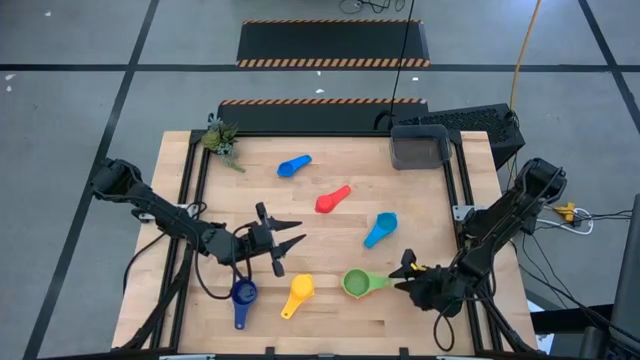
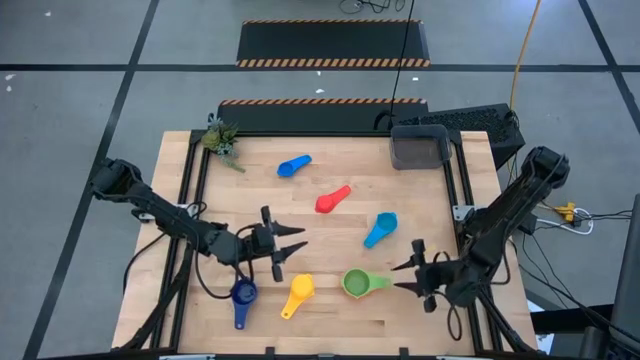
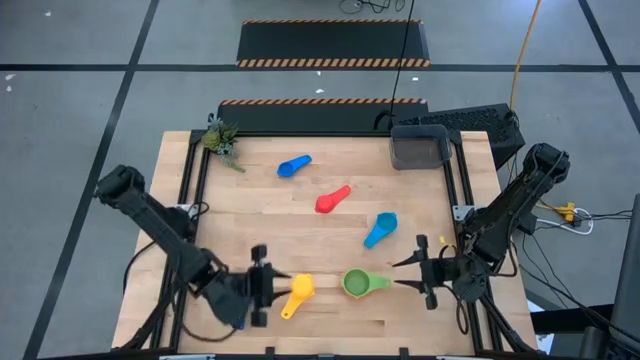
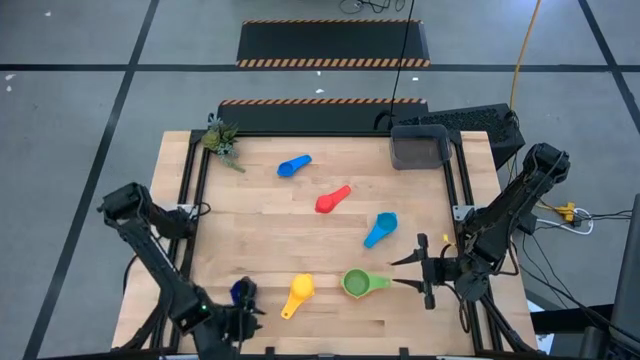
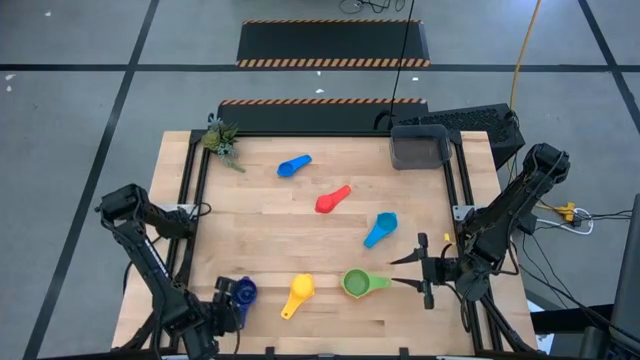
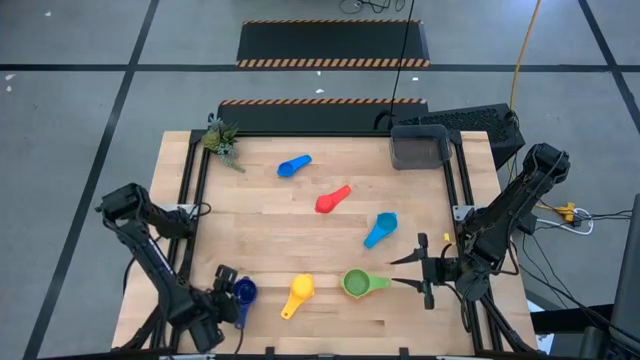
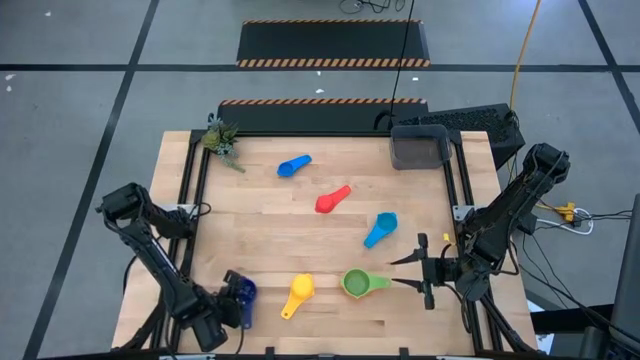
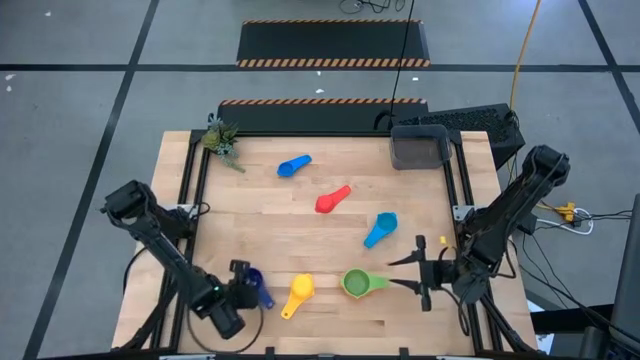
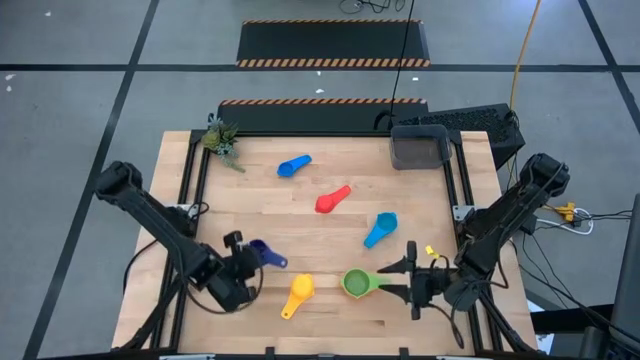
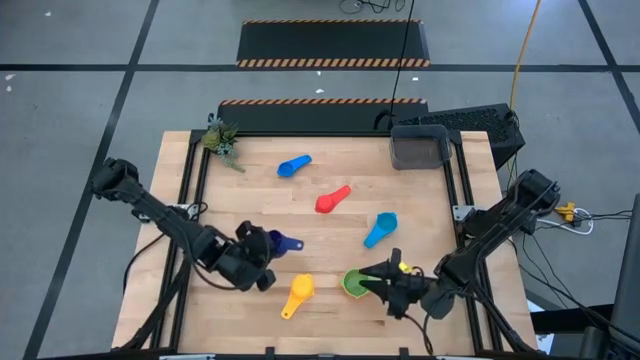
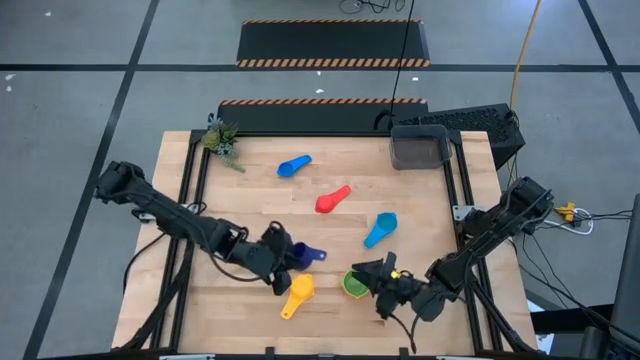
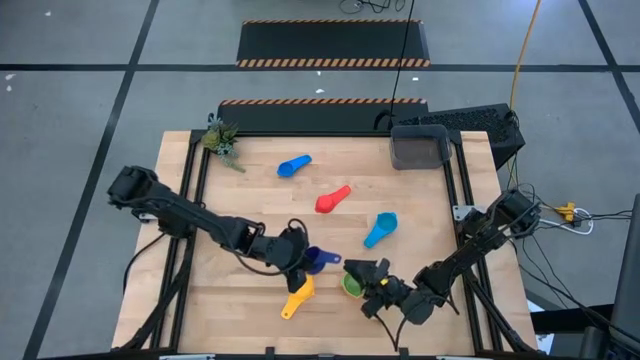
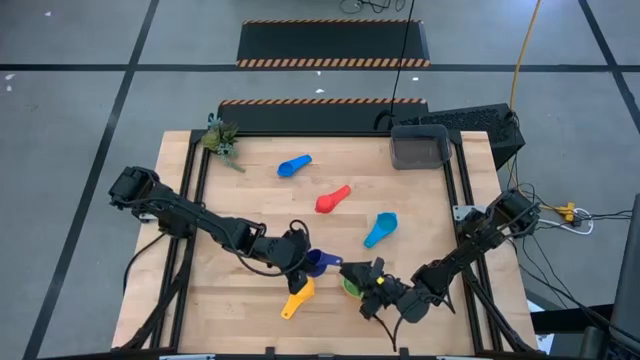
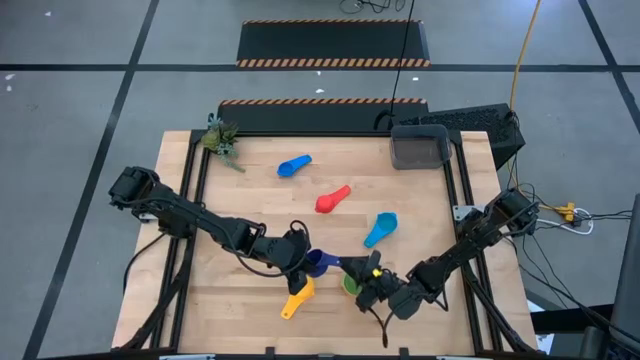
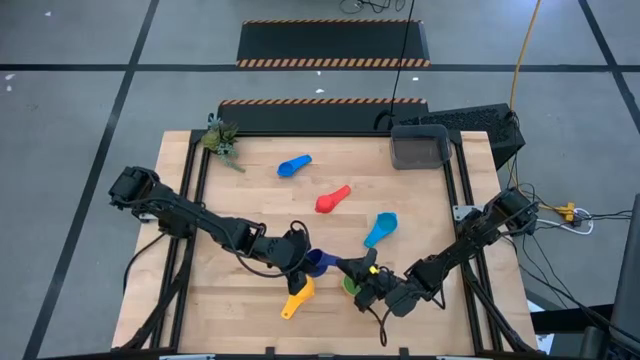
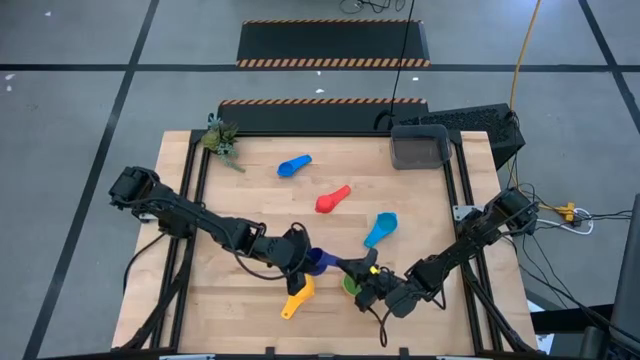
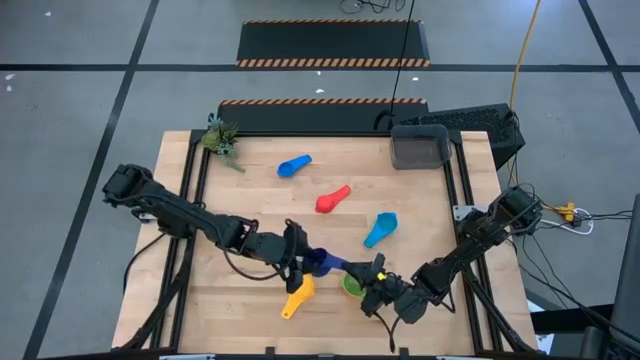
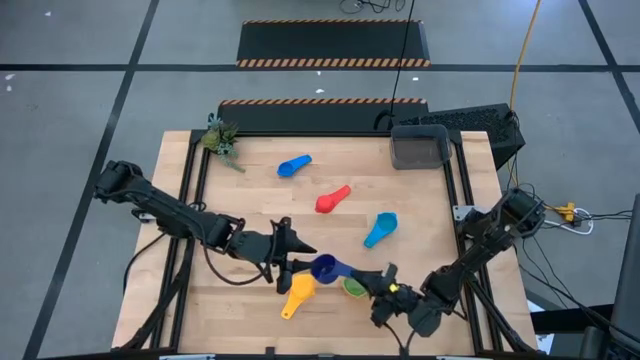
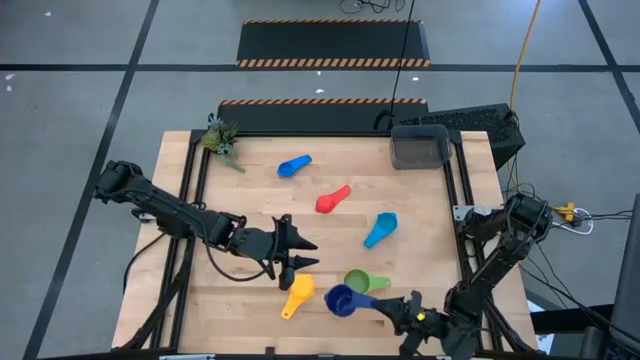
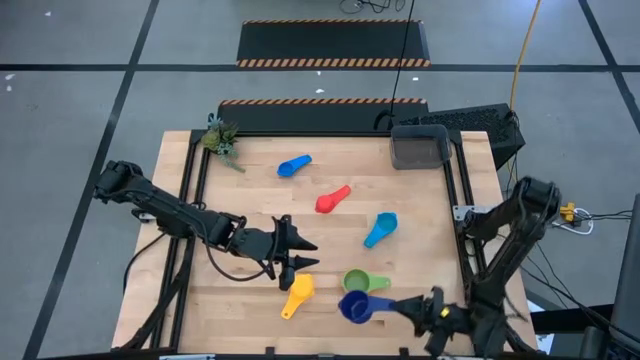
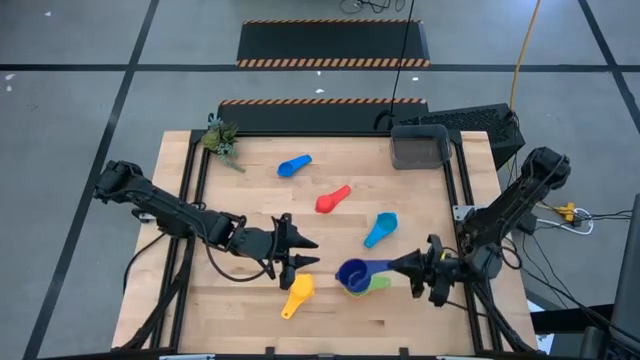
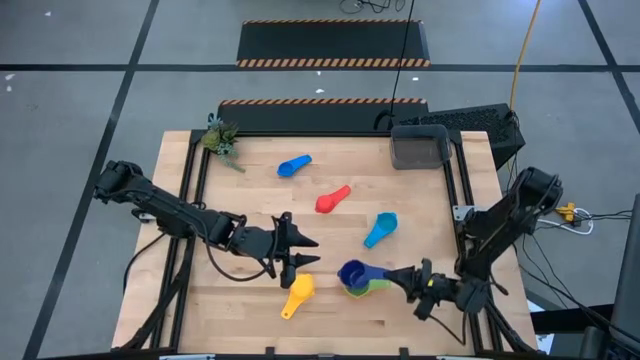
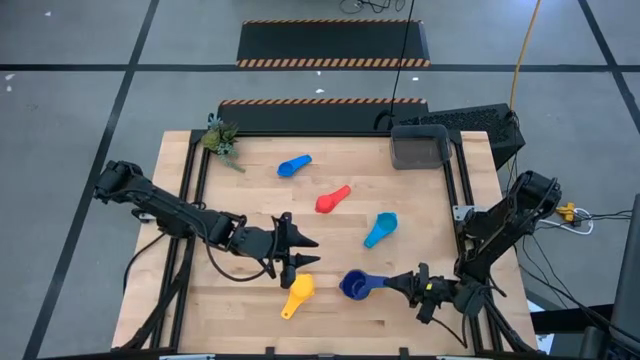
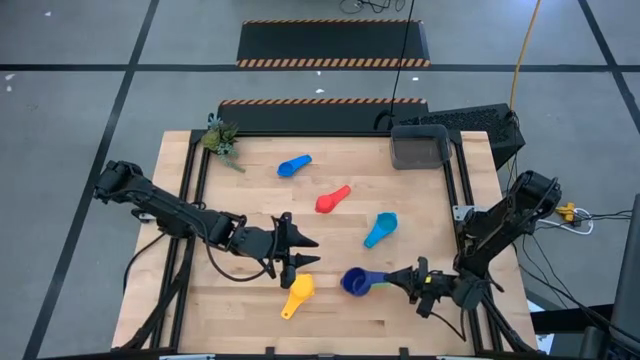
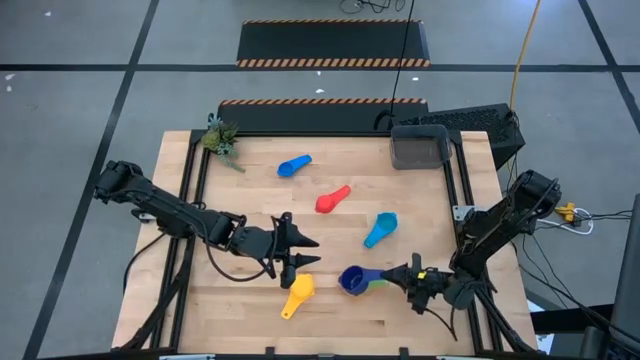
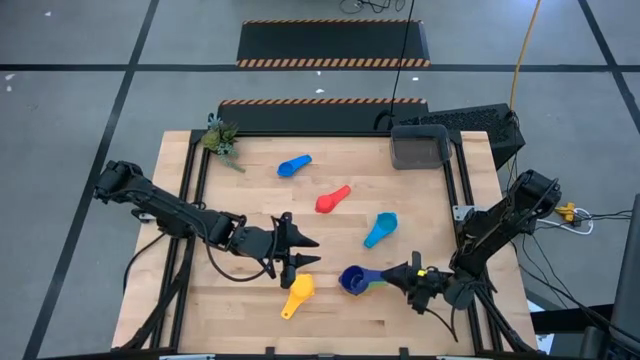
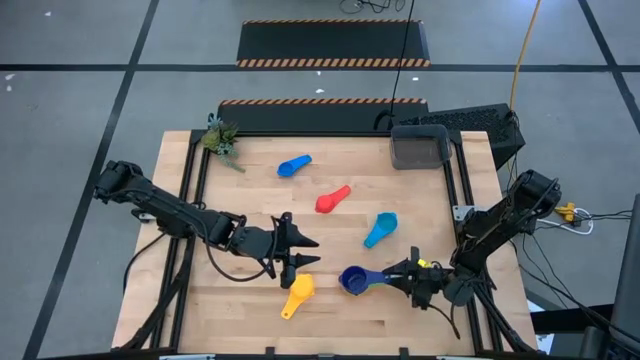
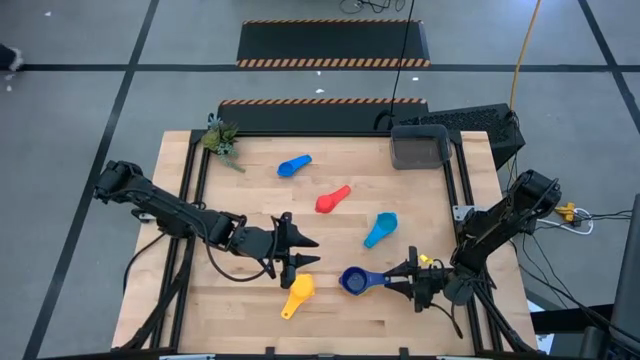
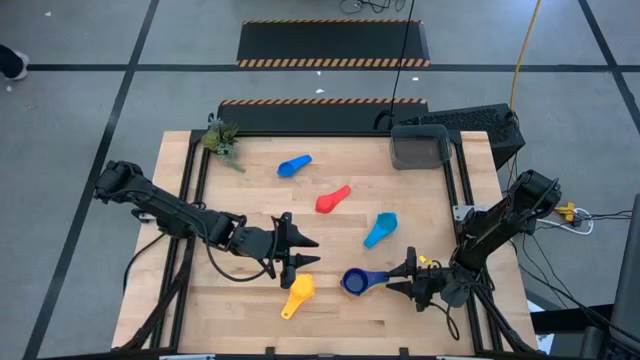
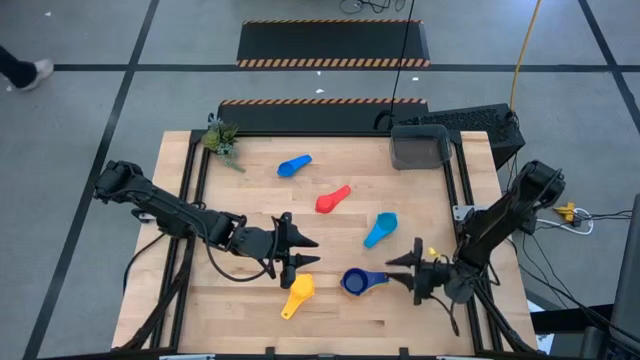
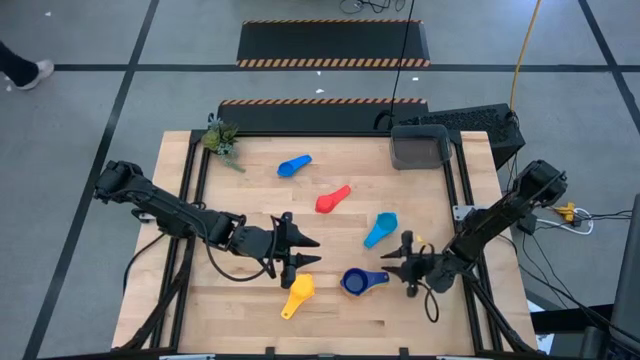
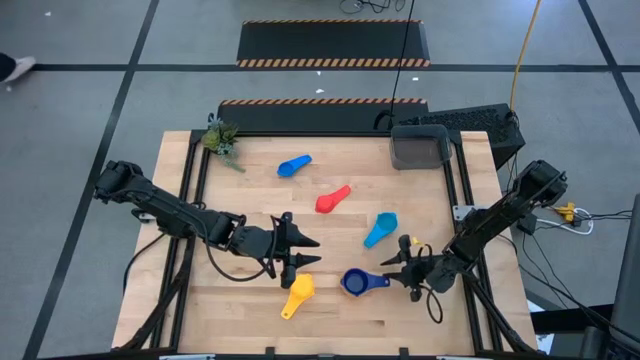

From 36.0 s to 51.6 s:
Task: Nest measuring cups in basket
Stack the dark blue measuring cup on top of the green measuring cup

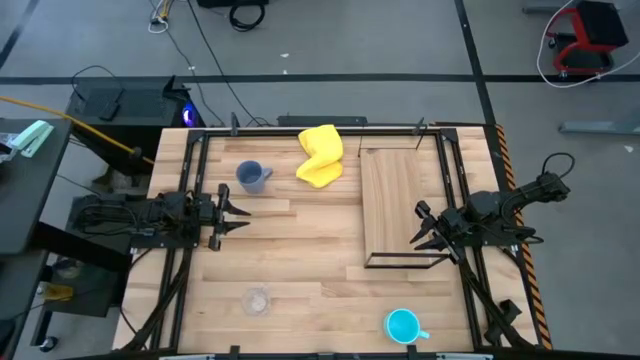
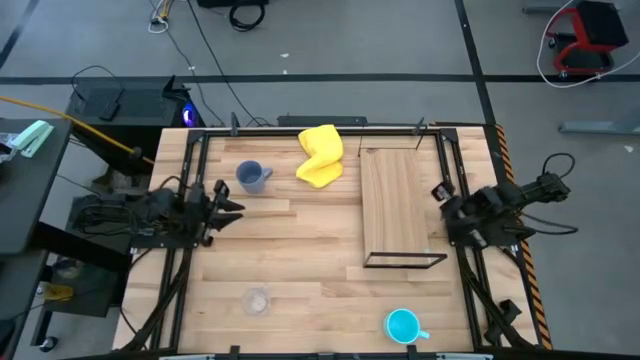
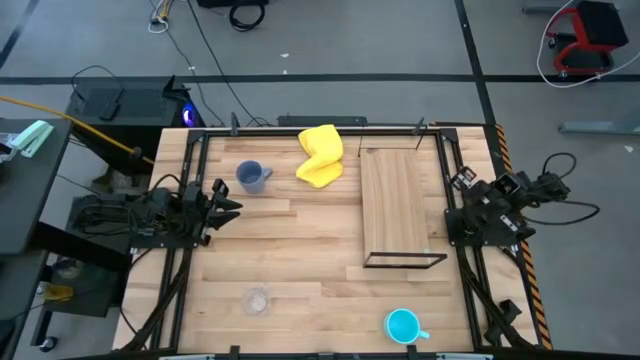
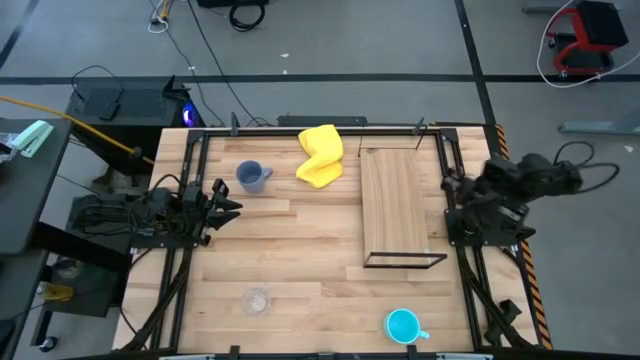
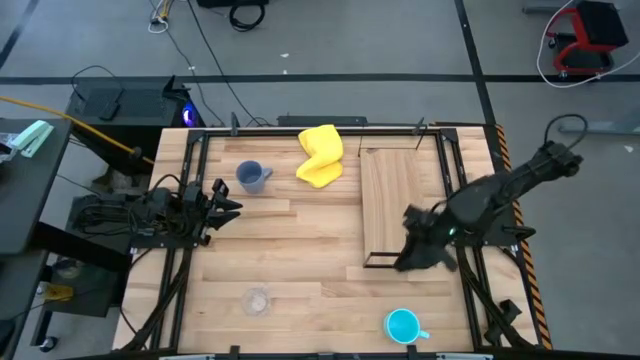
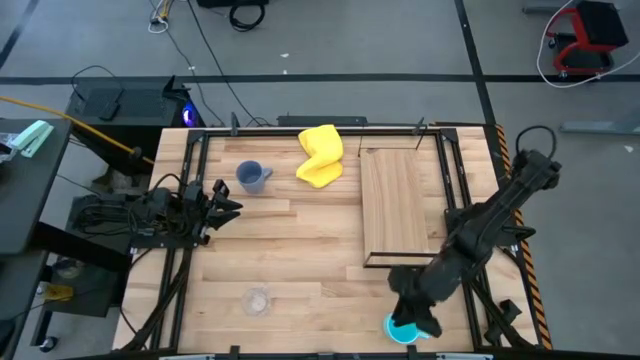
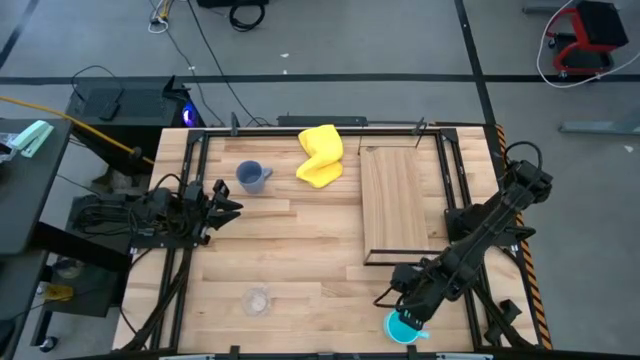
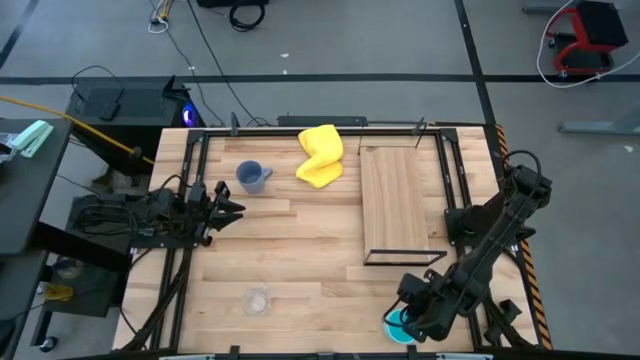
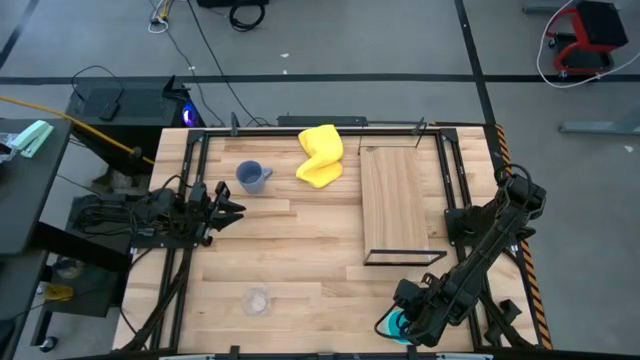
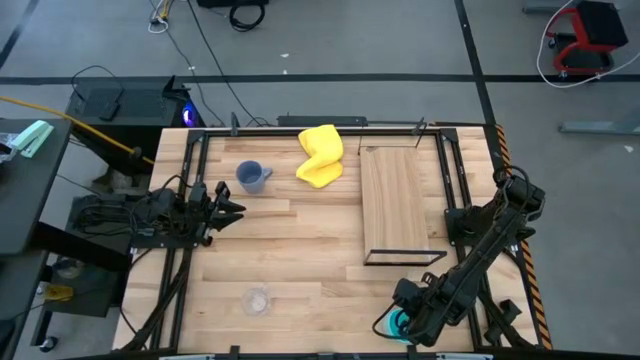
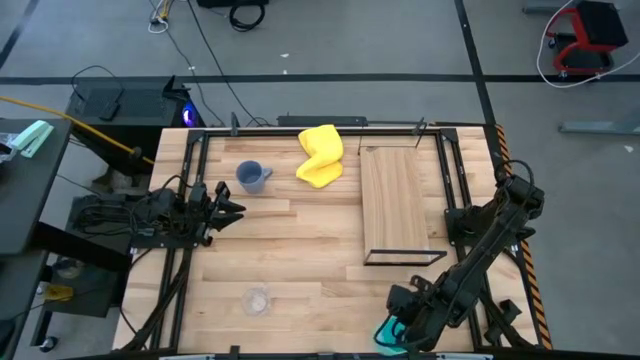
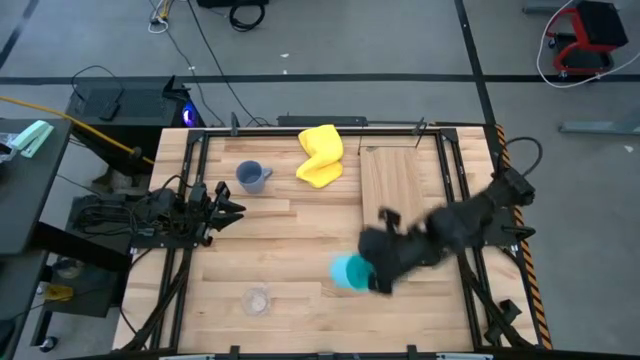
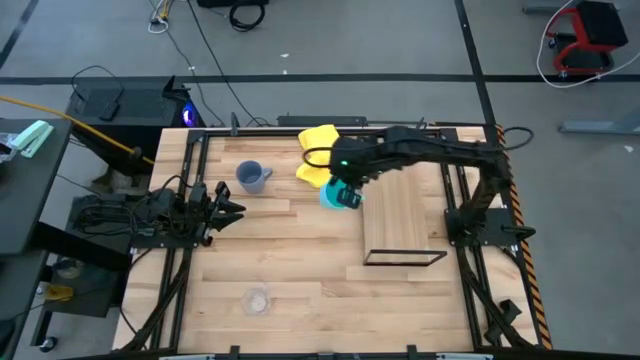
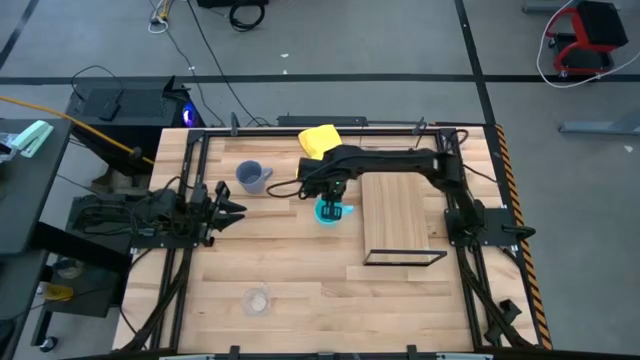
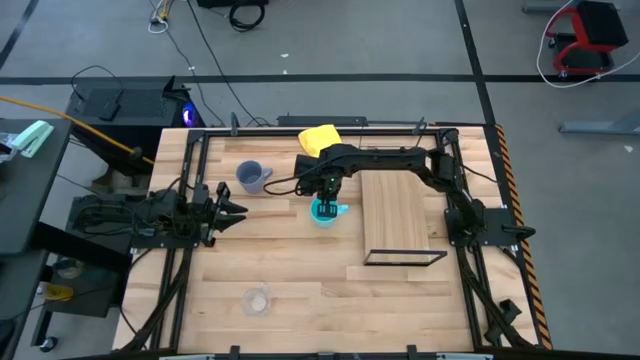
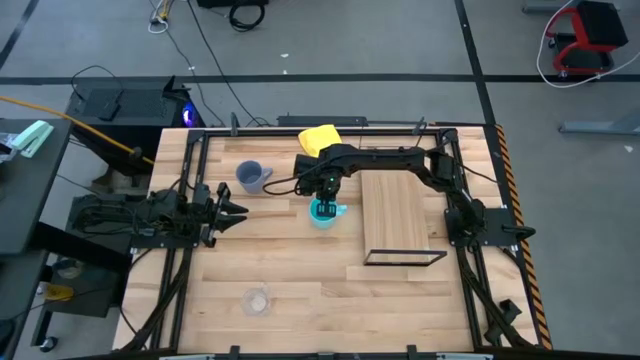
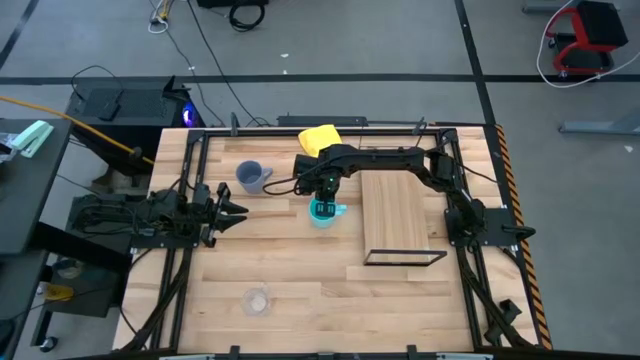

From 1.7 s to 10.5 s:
Task: Stack small to large cups/mugs on shelf
Move the blue mug to the center of the table
